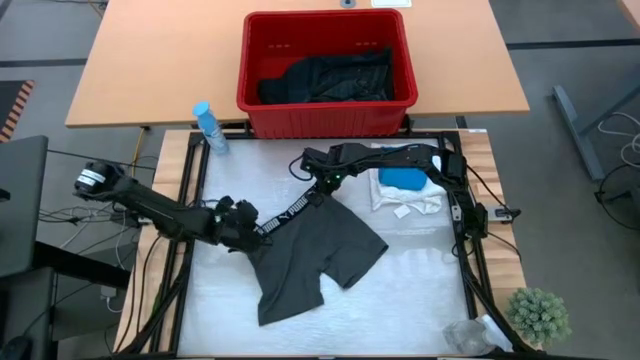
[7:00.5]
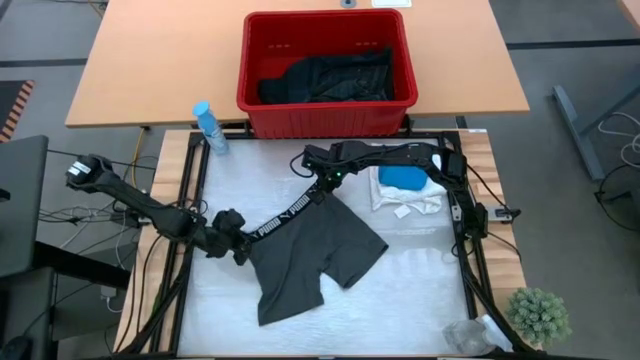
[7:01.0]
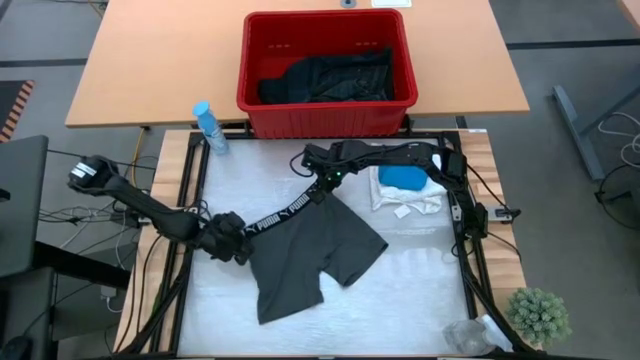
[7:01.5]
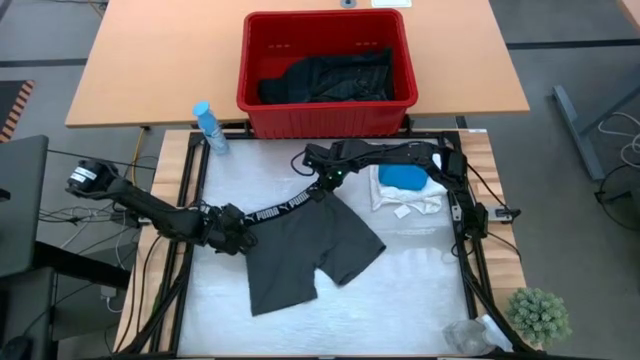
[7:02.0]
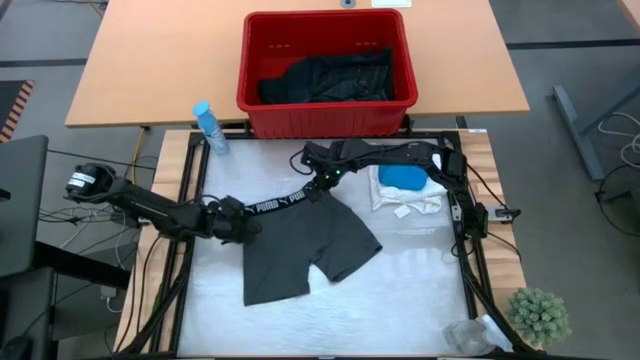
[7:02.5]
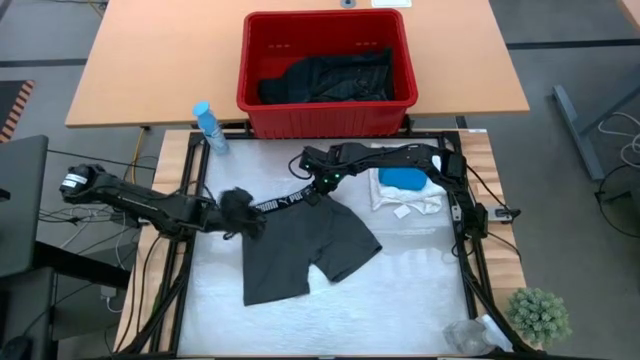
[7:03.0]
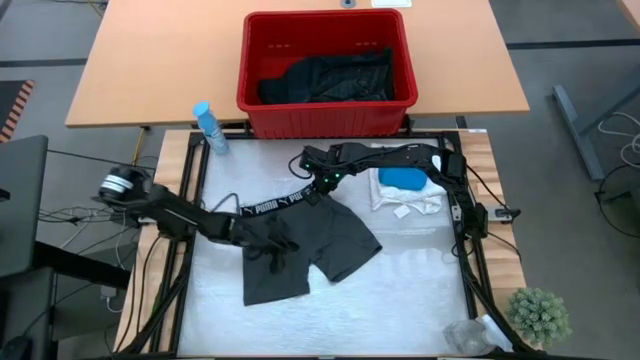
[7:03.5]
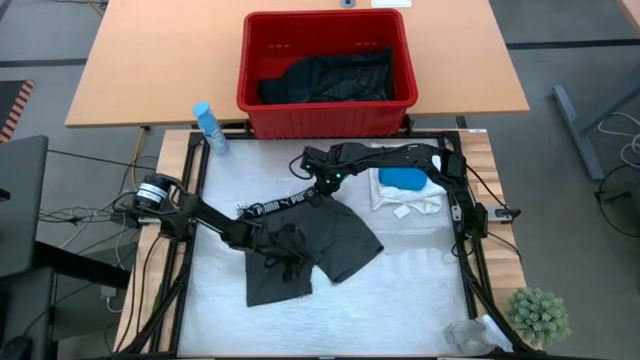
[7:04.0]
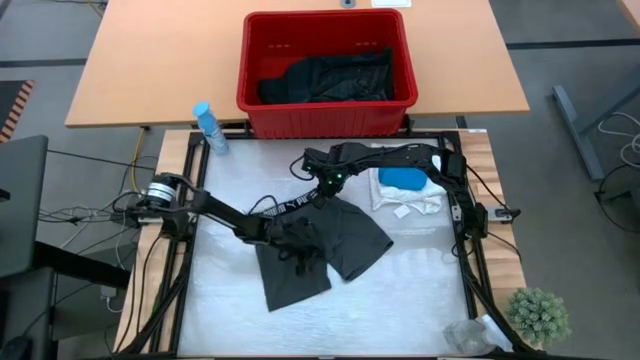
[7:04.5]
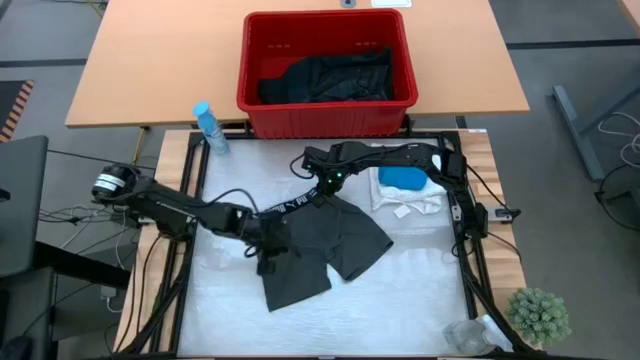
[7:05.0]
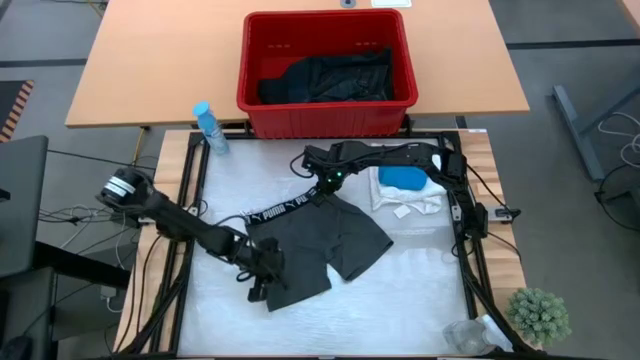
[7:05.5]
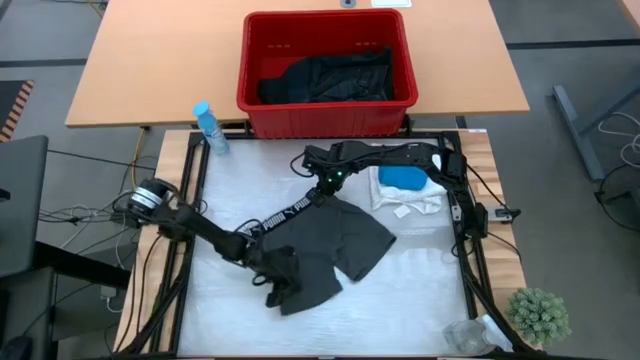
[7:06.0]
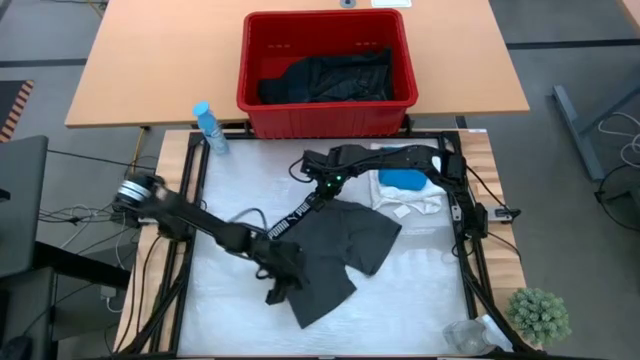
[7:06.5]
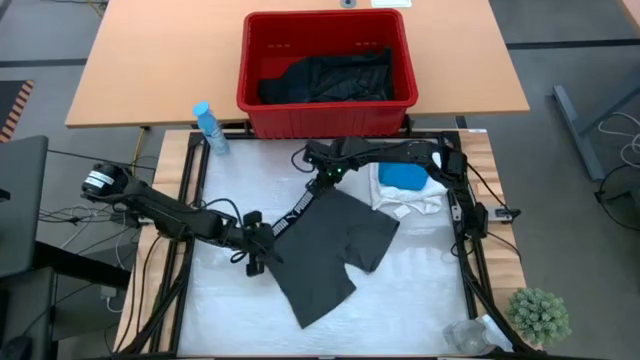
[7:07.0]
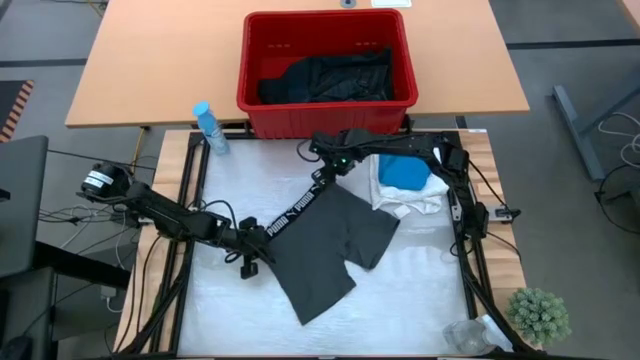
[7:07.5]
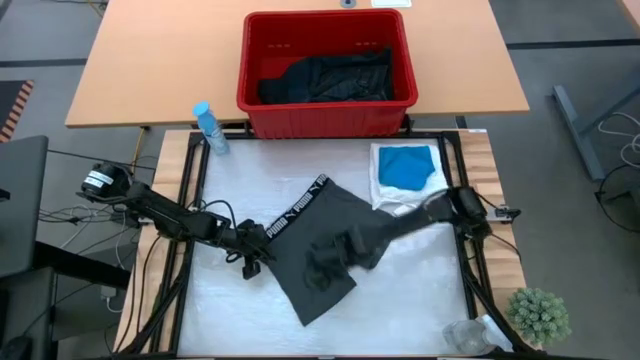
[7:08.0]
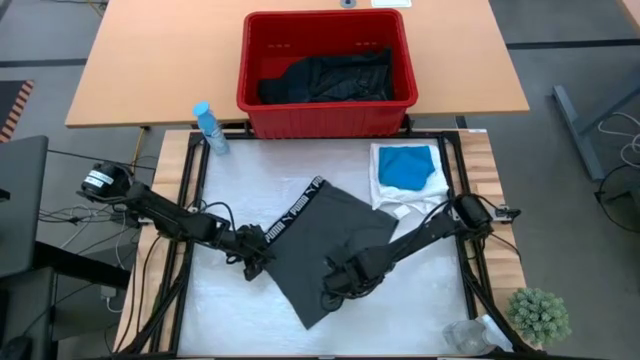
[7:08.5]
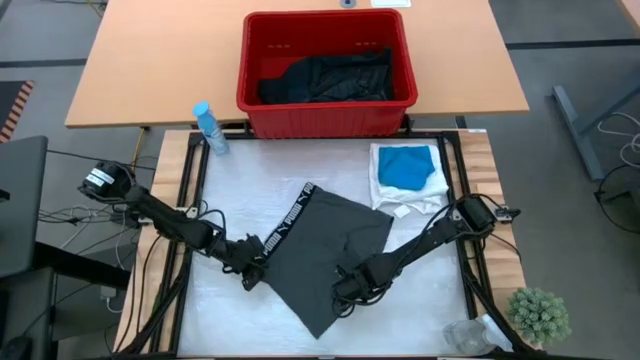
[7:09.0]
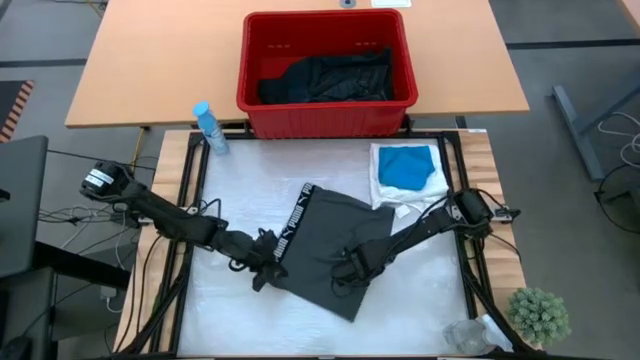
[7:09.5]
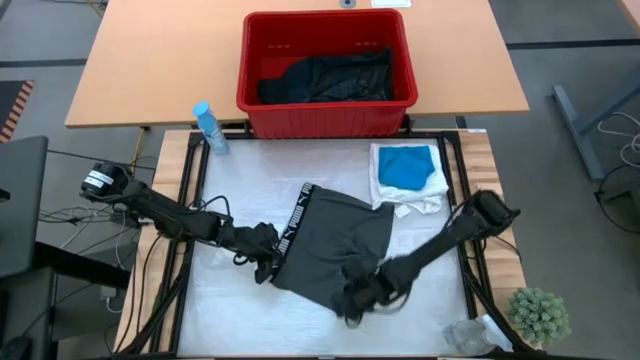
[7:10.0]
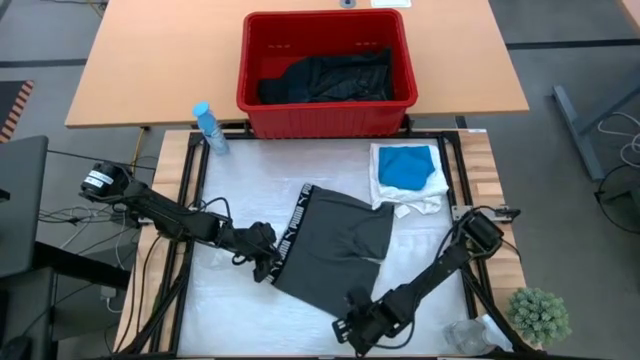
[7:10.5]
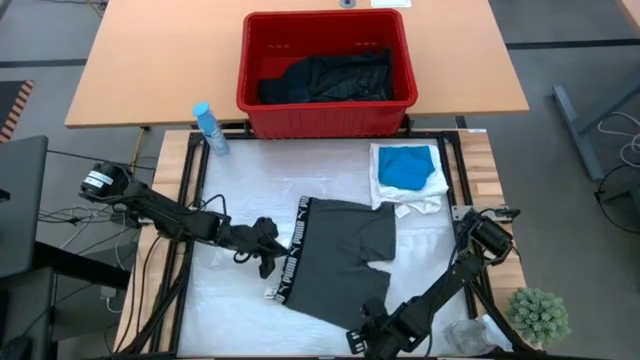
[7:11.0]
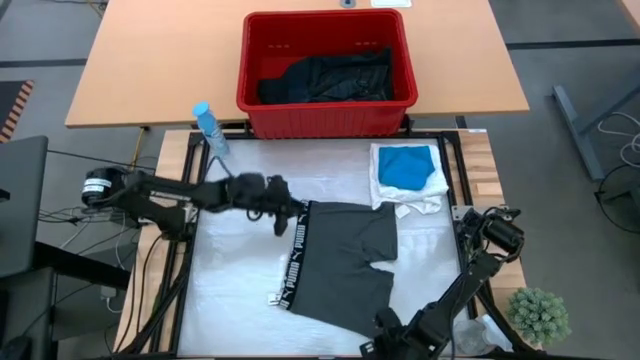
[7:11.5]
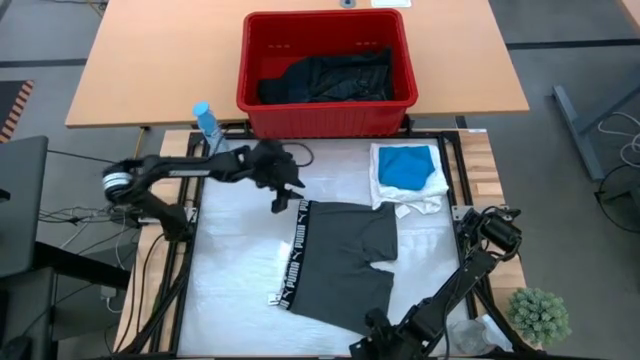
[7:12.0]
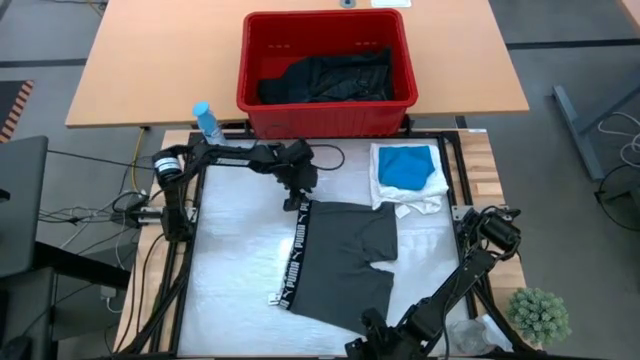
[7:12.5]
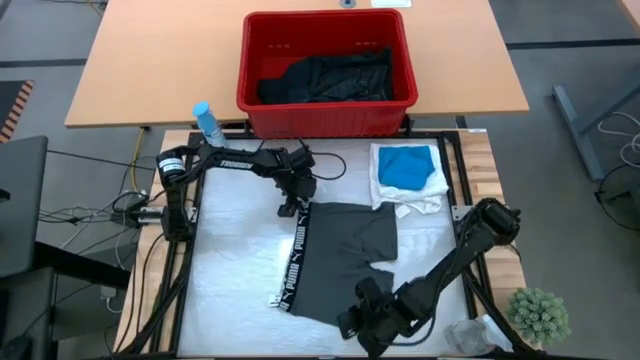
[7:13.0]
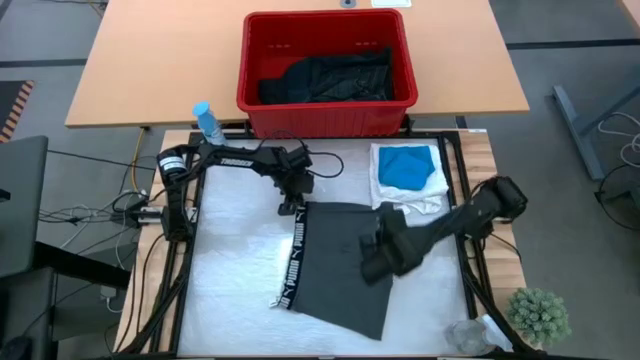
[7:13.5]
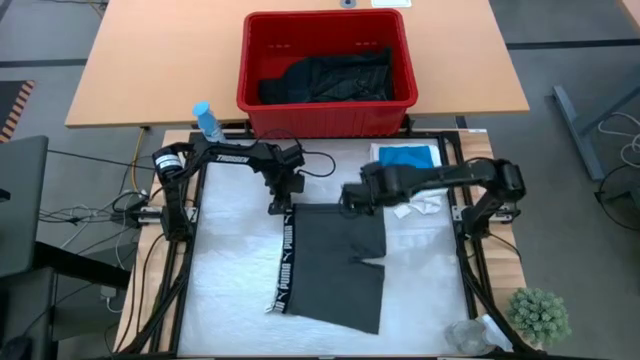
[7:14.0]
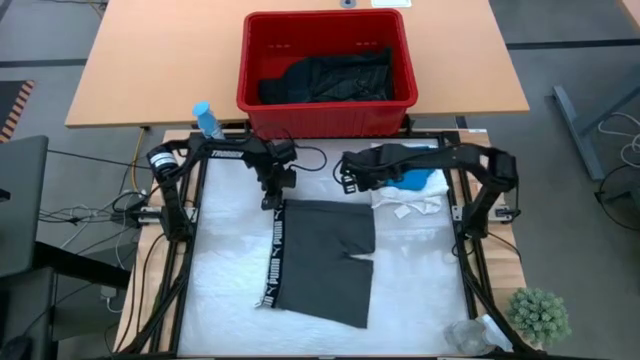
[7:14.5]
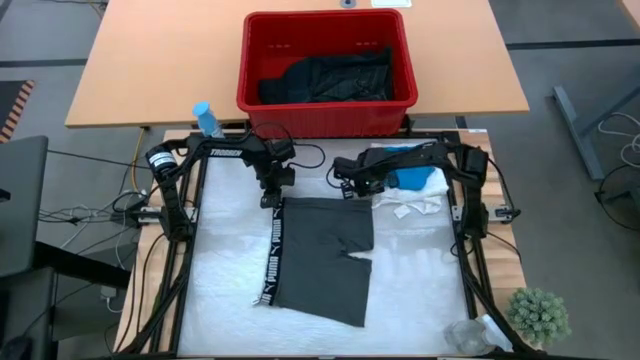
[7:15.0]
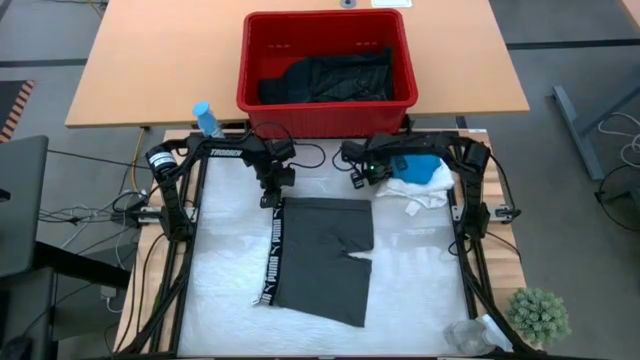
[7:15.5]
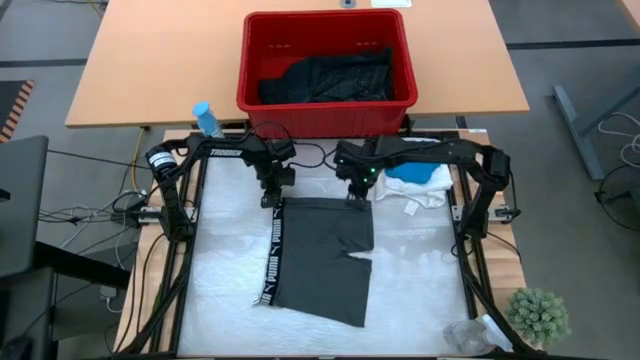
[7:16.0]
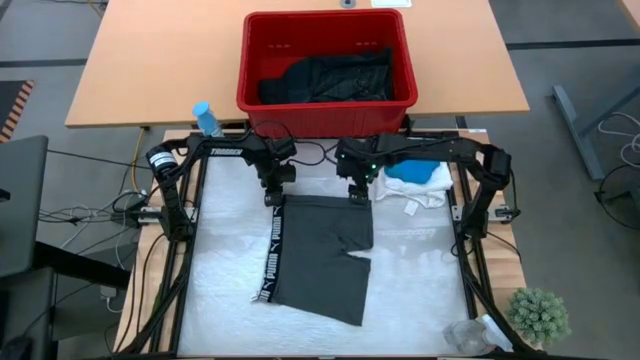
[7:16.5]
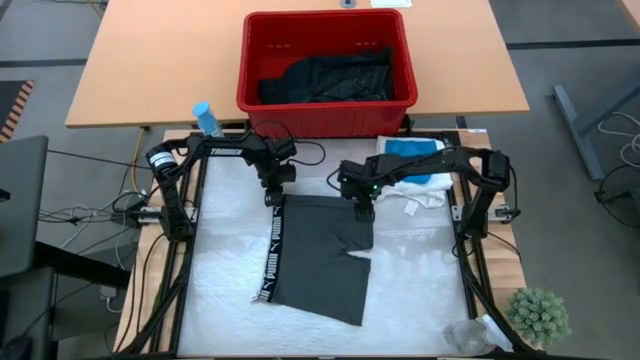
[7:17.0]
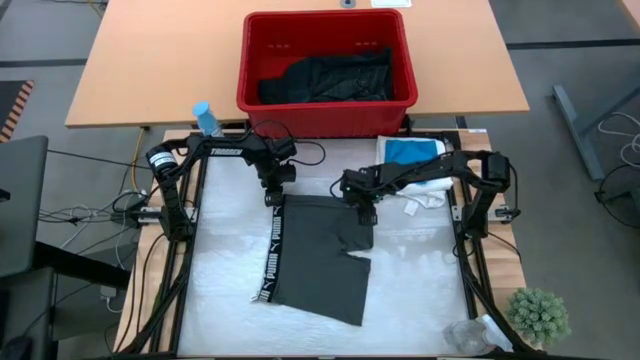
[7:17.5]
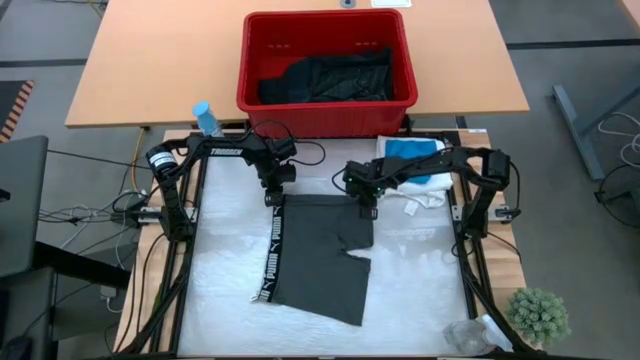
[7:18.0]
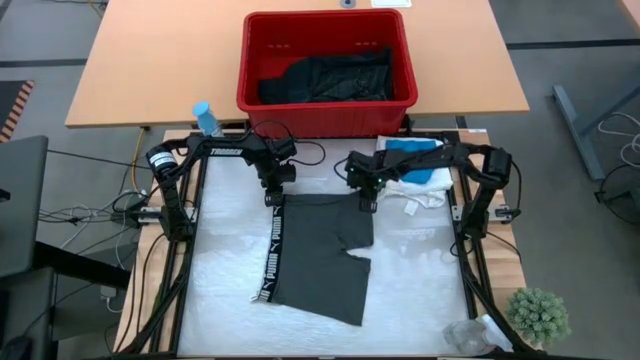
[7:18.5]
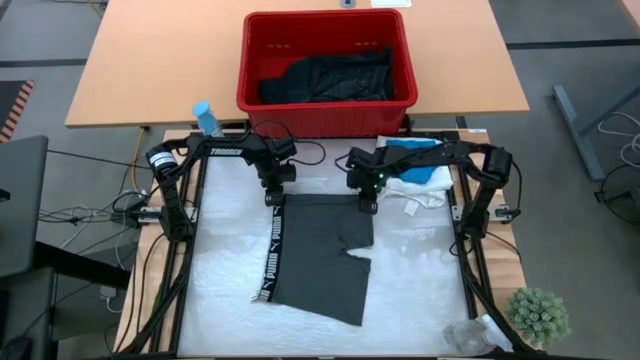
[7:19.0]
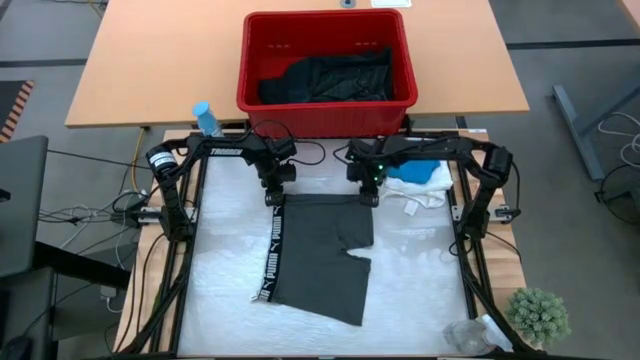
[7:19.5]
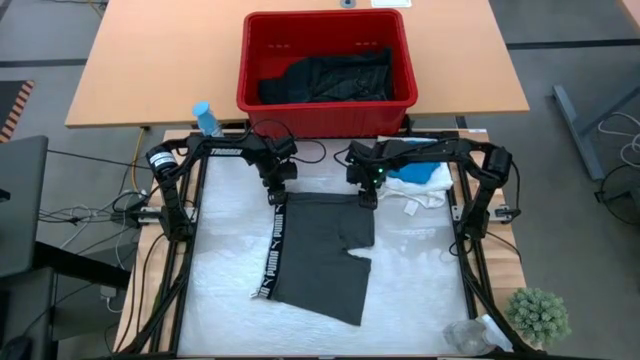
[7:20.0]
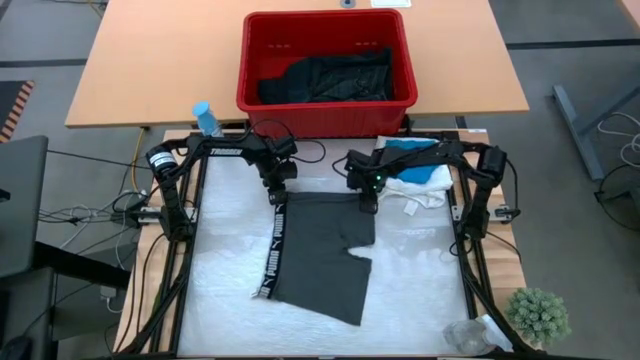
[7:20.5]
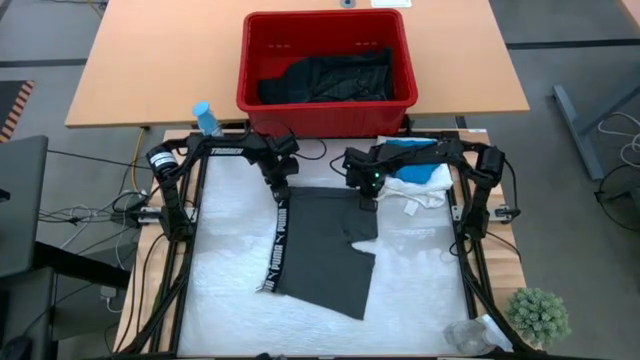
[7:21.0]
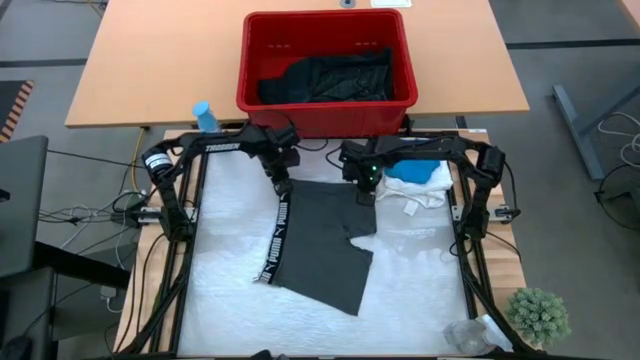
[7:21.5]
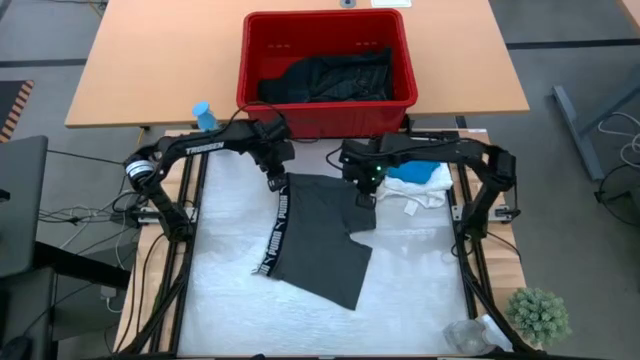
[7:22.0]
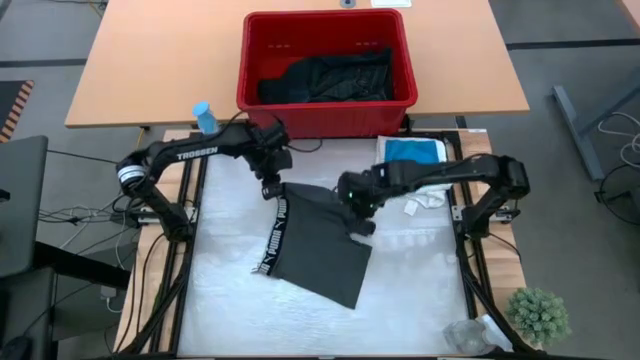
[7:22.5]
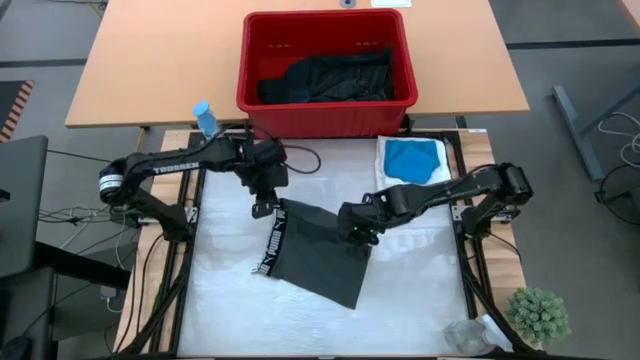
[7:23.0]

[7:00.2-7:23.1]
Task: Fold laundry
Fold the gray boxers
